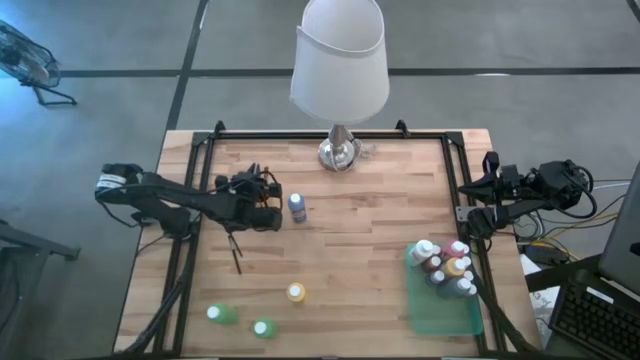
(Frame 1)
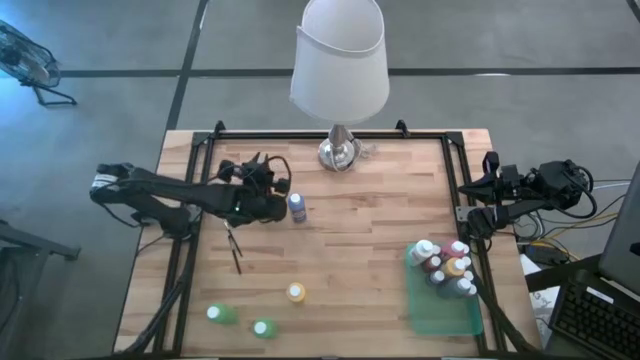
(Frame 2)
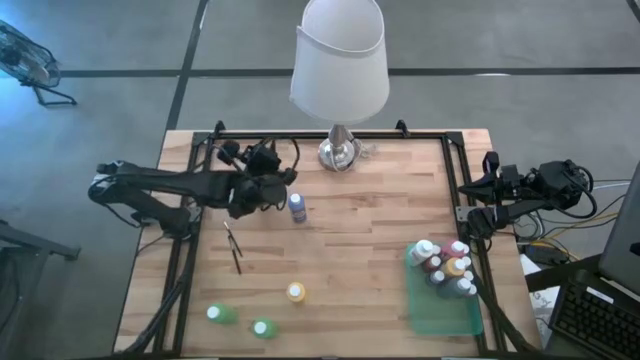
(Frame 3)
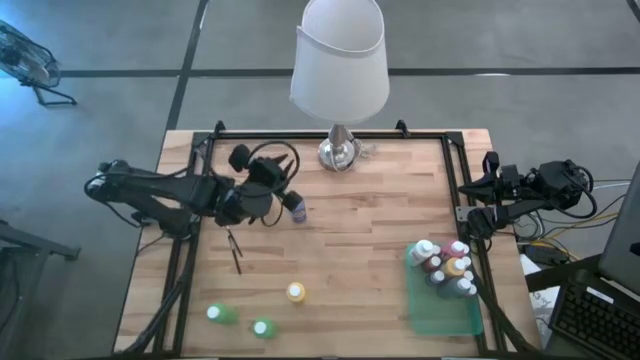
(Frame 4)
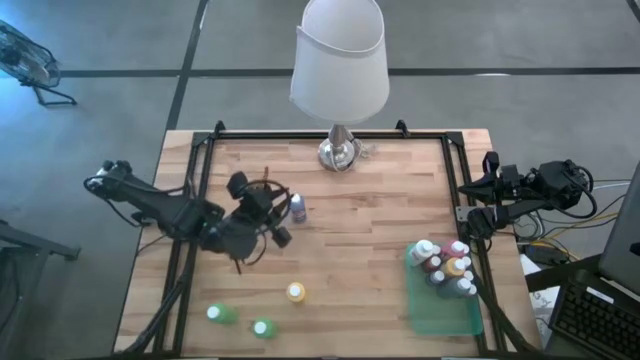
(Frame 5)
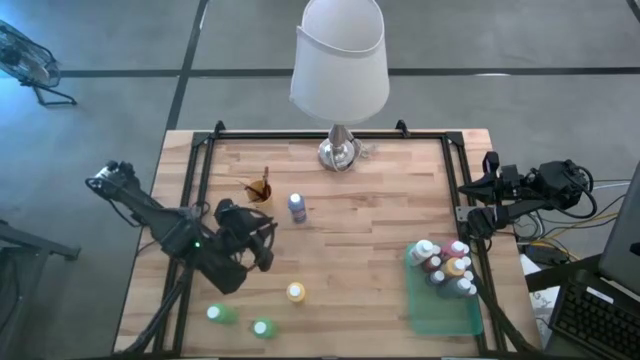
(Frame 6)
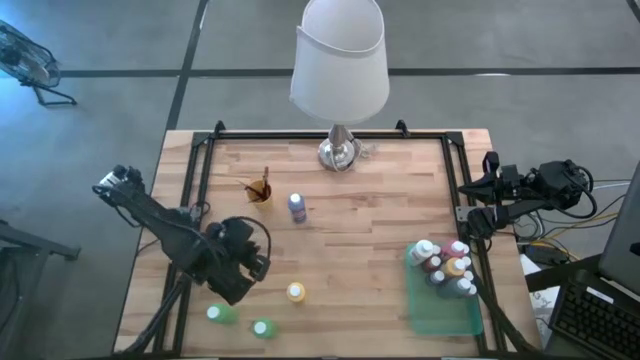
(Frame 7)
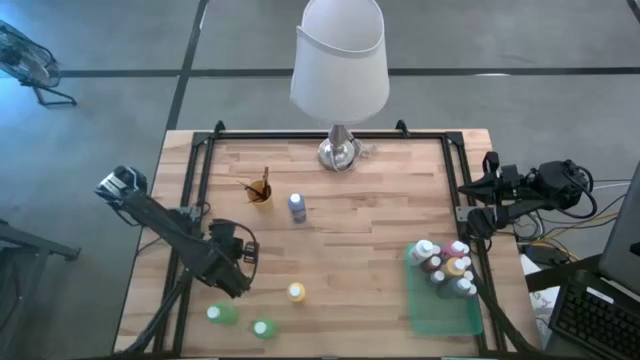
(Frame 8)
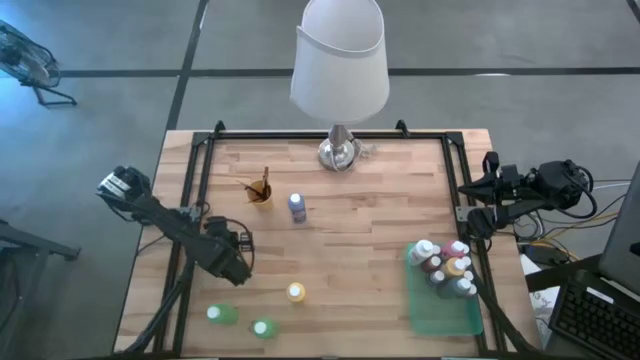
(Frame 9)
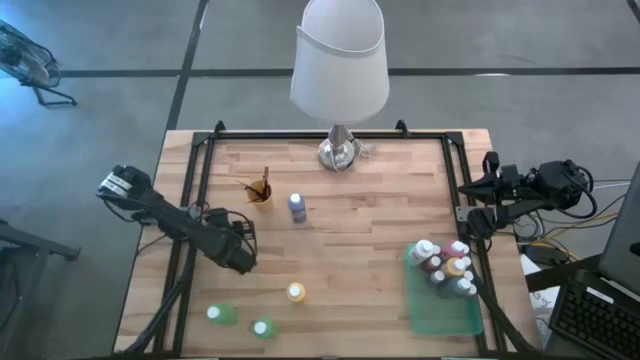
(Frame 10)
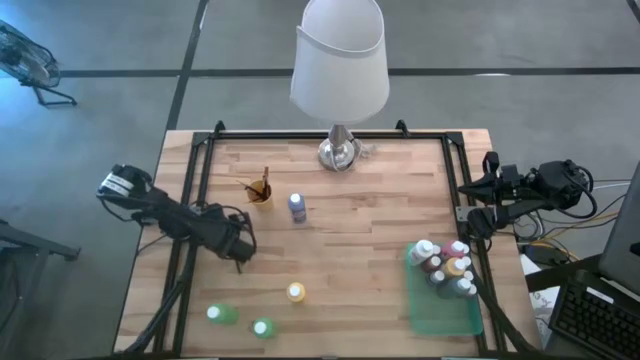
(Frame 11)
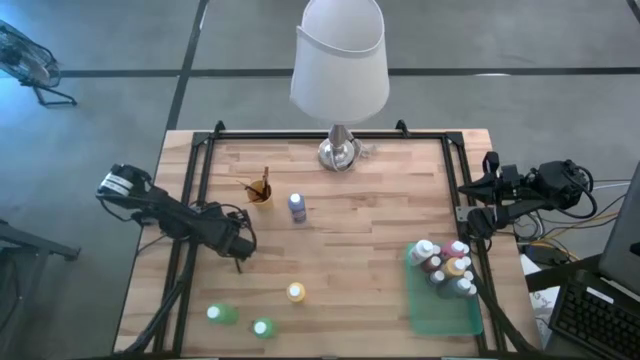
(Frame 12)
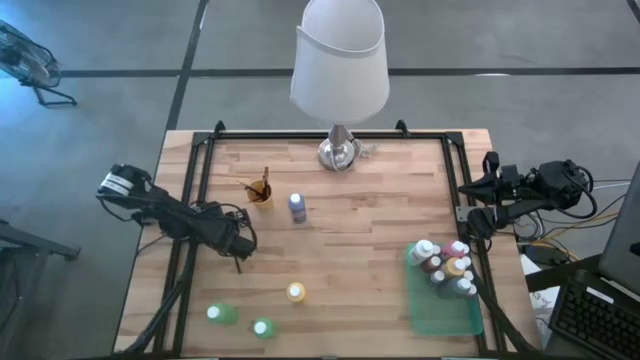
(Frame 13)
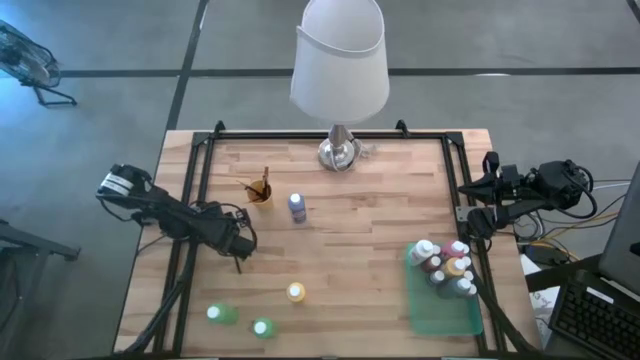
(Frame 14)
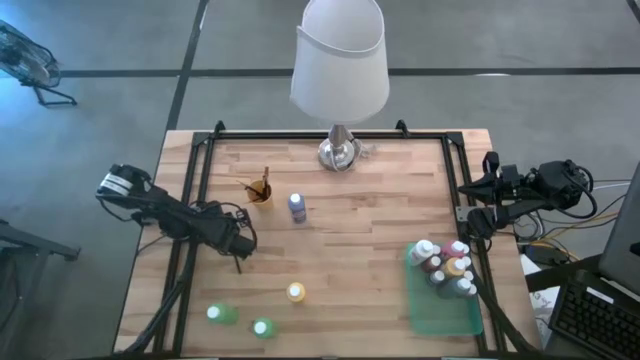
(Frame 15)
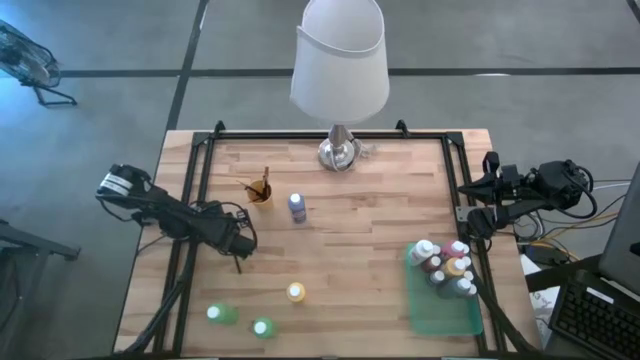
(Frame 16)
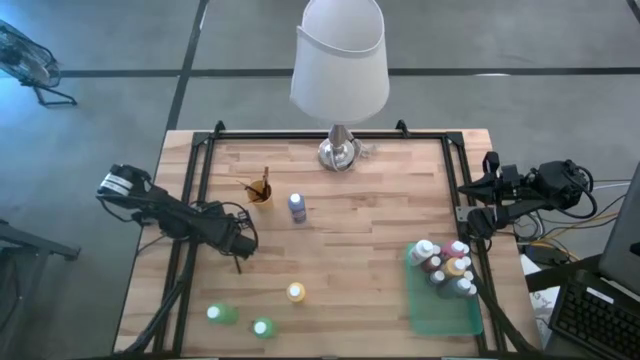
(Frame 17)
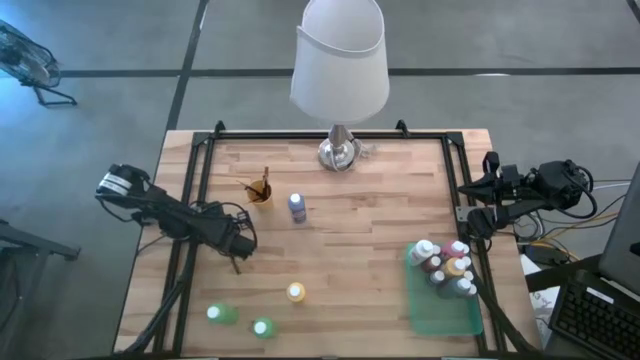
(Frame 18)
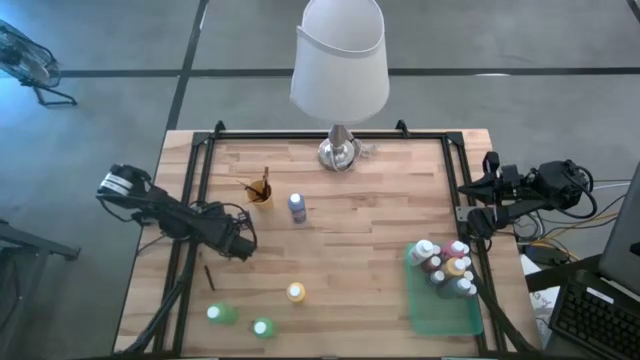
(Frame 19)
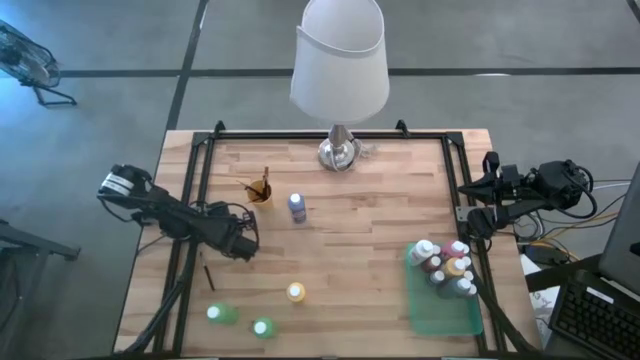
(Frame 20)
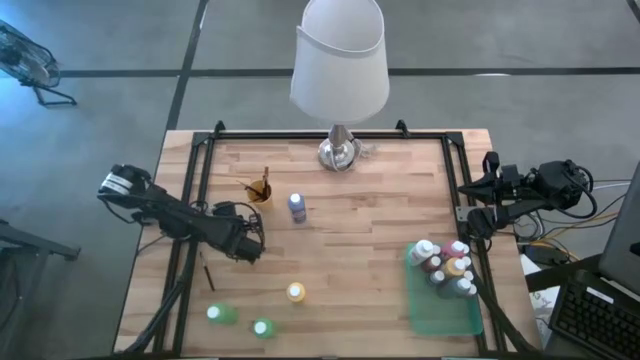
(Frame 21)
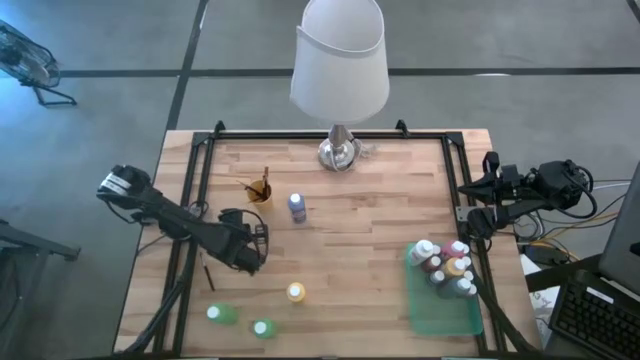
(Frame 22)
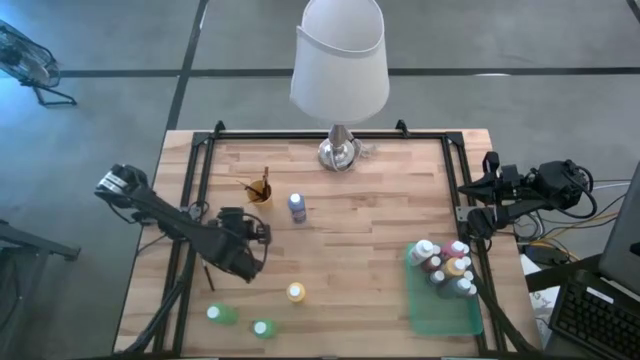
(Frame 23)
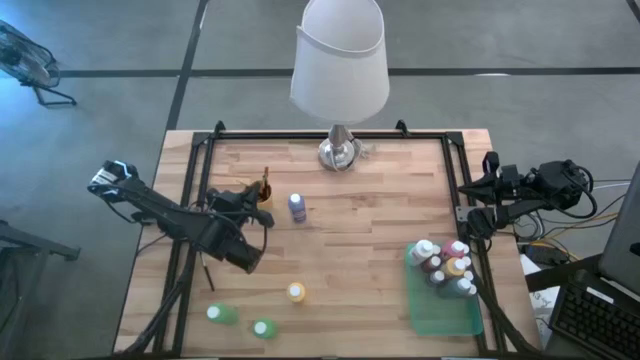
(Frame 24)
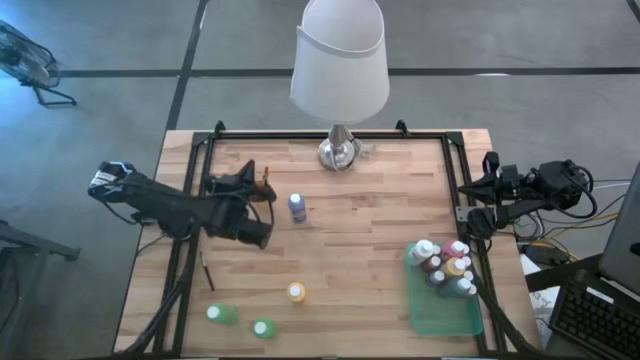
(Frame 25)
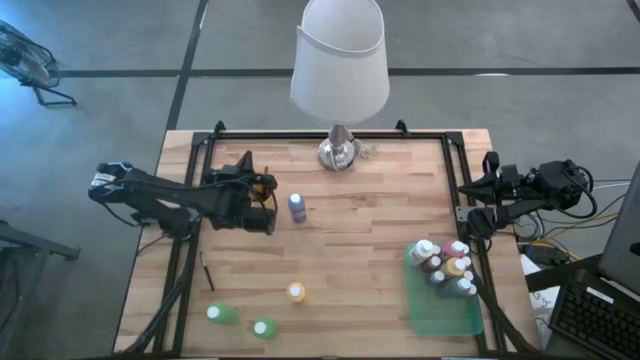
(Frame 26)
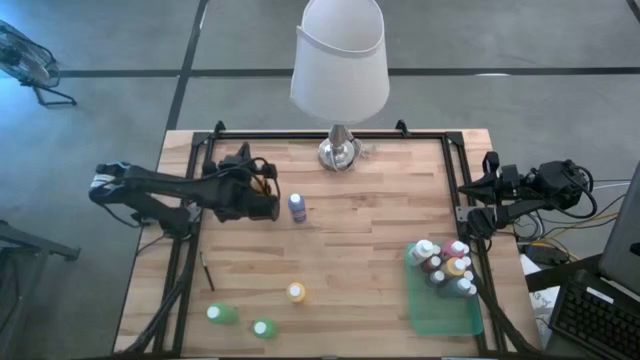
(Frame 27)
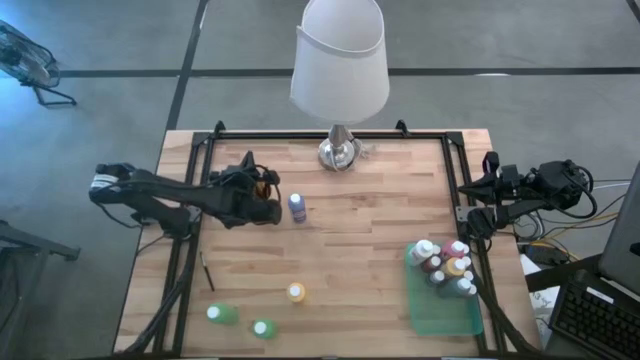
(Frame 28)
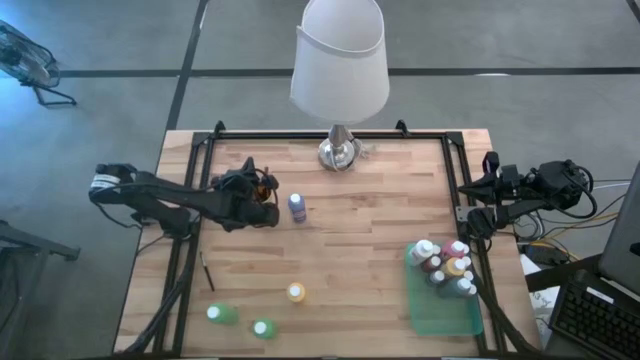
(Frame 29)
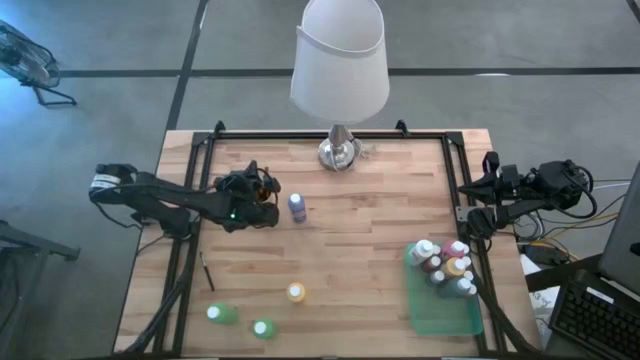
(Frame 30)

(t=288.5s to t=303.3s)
Task: Pick & Place Paint Supplies
Put the silver paint brush into the yellow cup
